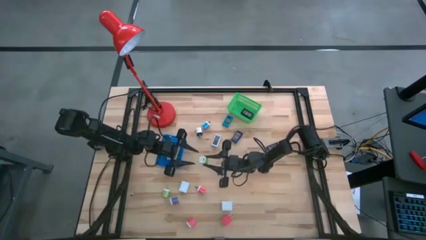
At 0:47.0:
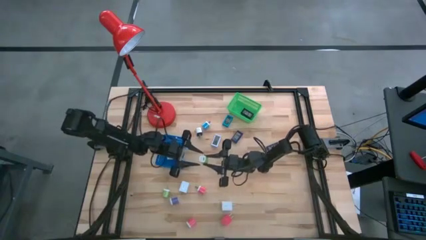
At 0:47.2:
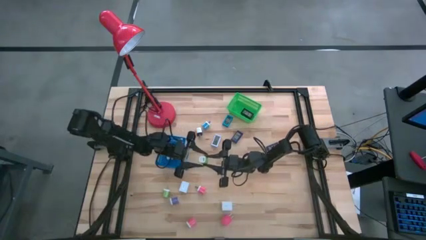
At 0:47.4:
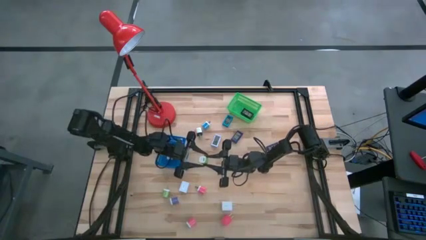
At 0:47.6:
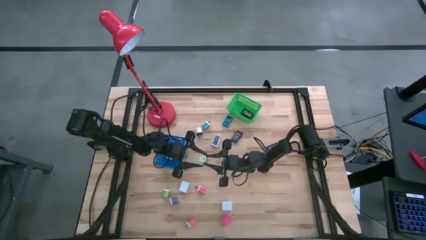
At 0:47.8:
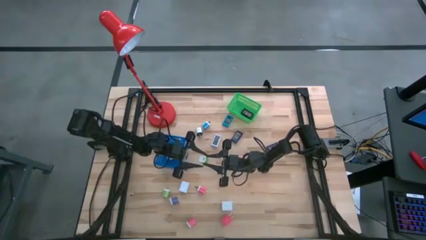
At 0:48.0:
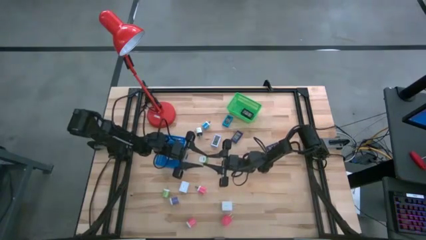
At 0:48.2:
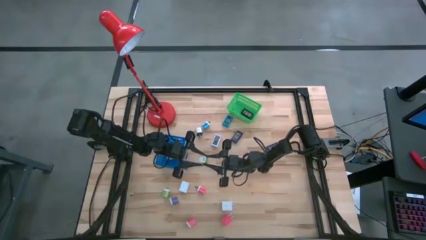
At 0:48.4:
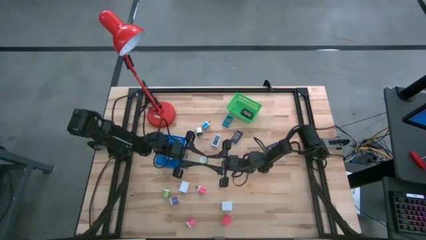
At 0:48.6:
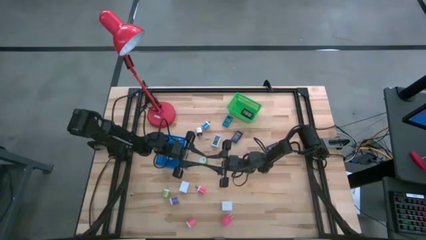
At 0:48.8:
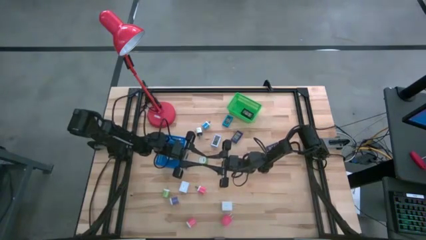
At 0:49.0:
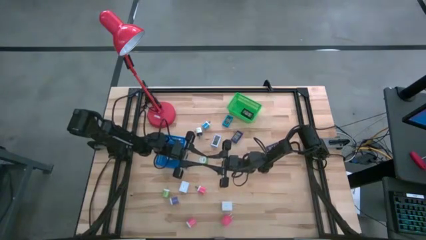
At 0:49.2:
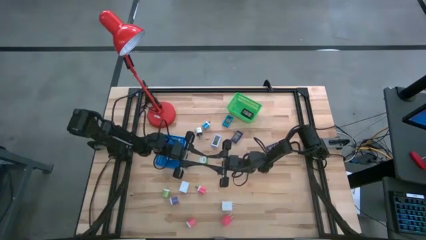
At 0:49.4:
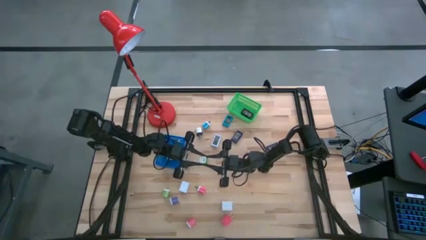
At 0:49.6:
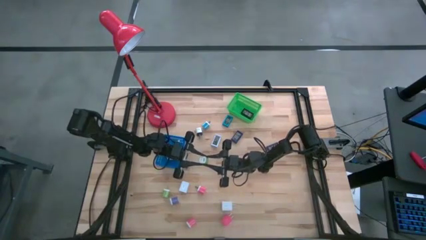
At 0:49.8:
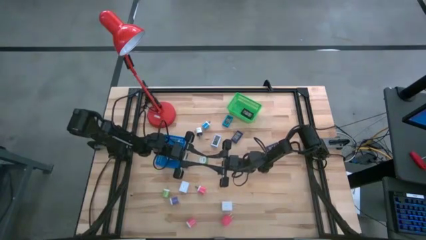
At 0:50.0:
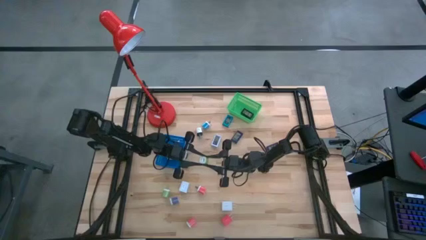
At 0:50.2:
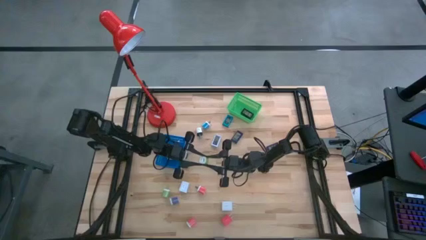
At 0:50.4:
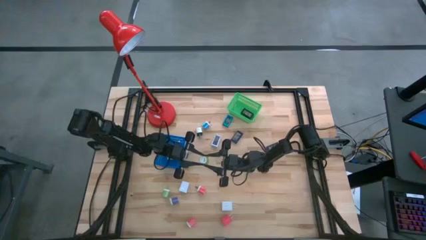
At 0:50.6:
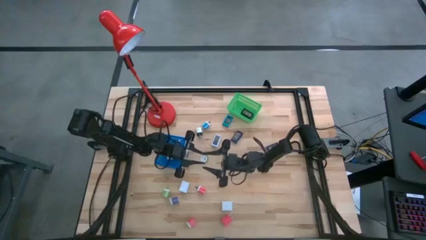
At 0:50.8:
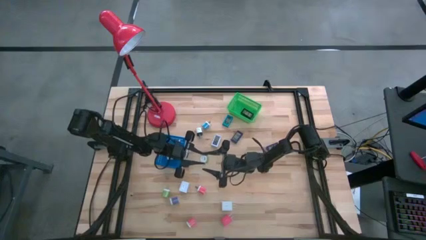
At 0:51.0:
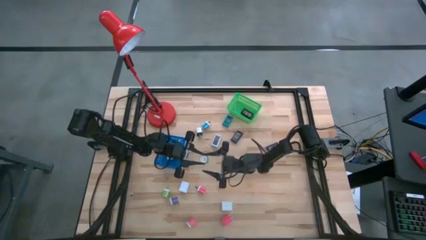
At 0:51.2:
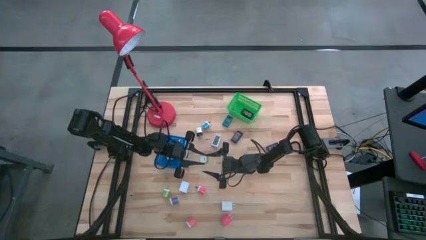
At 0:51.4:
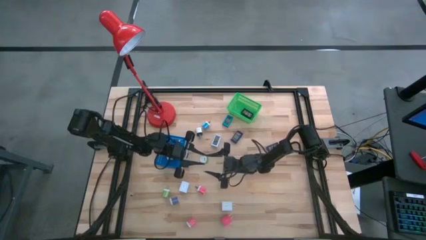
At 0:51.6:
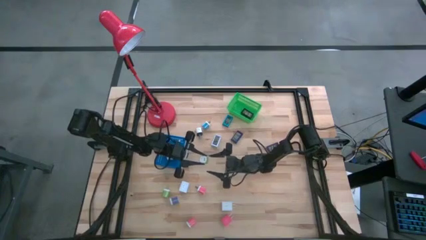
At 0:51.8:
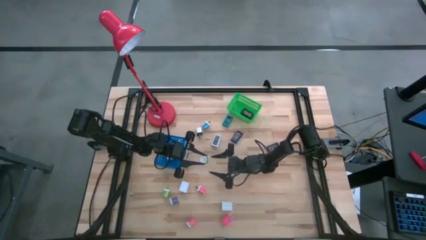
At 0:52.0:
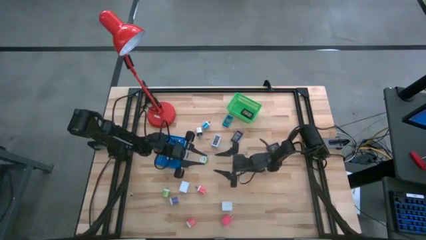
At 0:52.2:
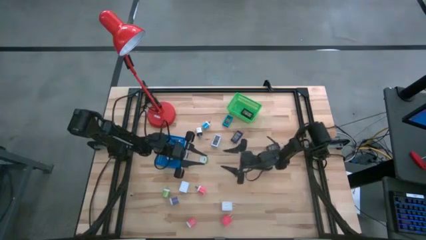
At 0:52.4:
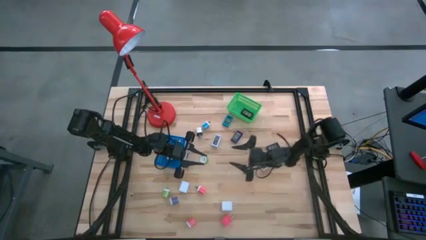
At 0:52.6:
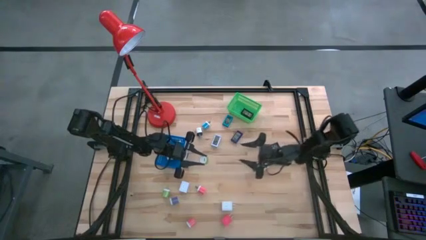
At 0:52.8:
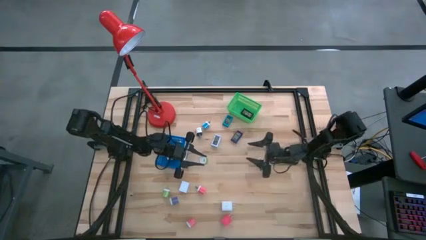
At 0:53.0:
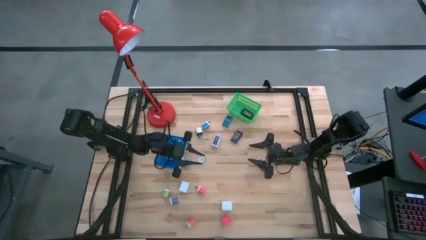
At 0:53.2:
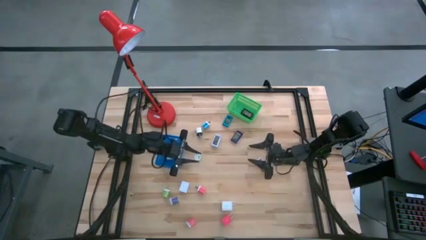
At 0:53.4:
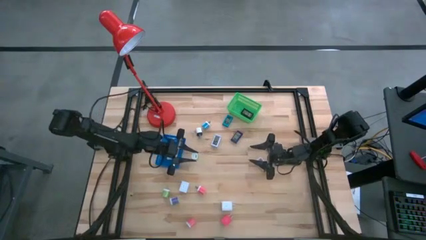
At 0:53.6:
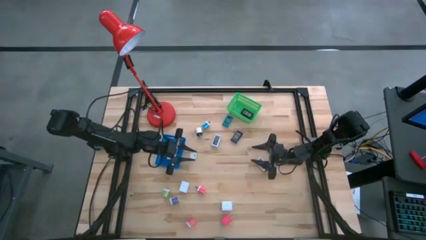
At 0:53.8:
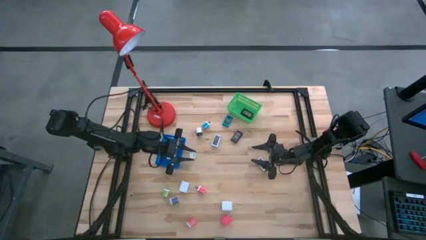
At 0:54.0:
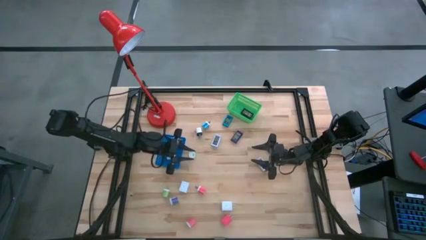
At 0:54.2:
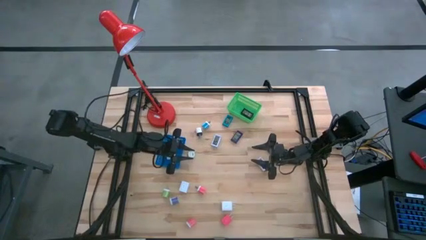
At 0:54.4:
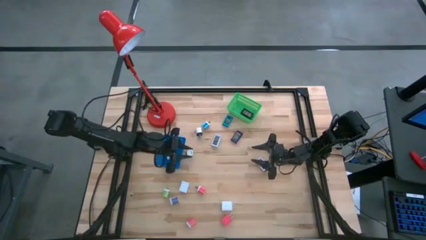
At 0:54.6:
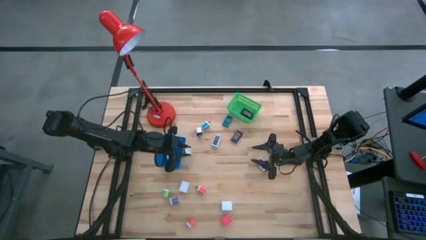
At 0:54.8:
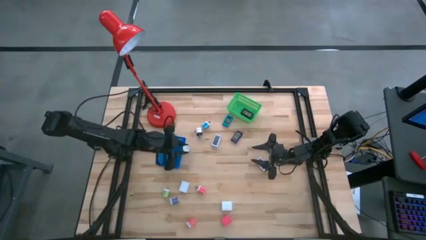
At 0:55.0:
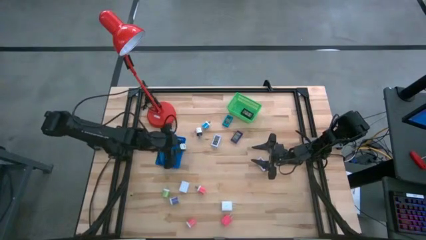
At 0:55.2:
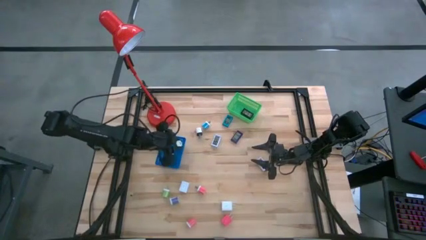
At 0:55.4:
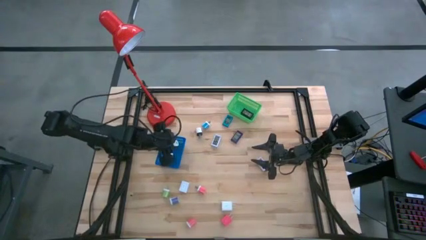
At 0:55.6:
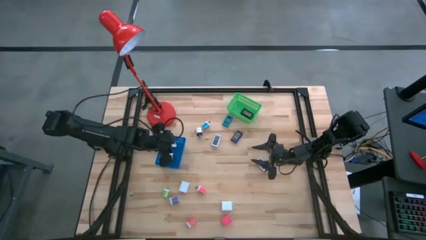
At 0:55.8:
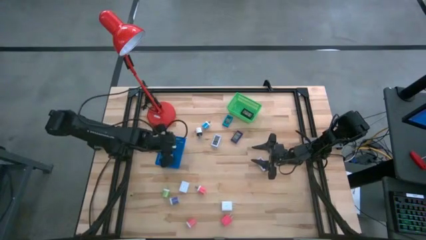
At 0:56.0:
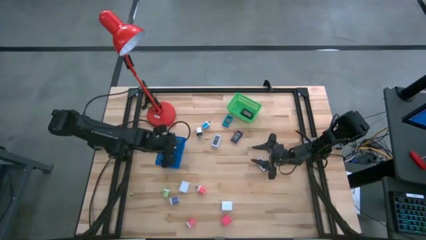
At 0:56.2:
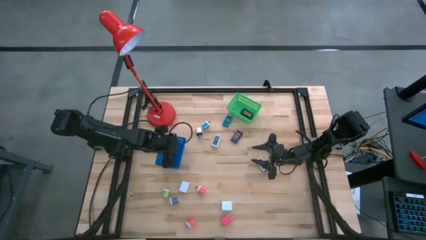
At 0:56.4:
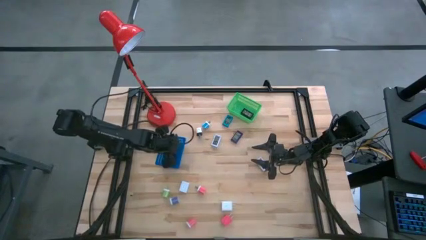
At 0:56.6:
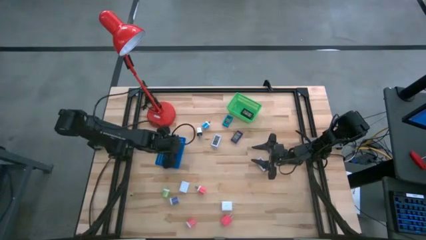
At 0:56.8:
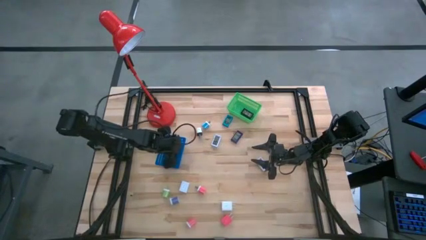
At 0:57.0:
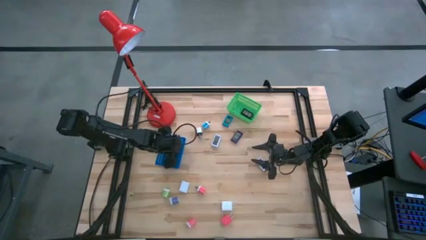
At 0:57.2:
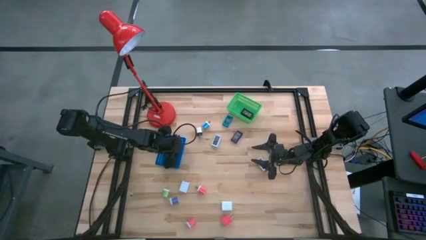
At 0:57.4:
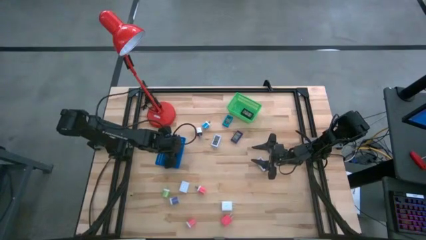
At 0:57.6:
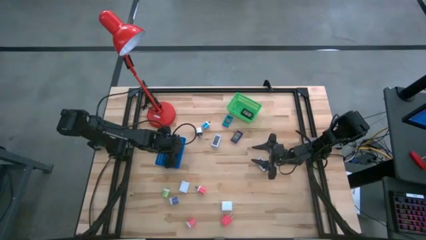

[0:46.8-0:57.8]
Task: Pick & Place Office items
Put the right green charger adapter into the blue basket
